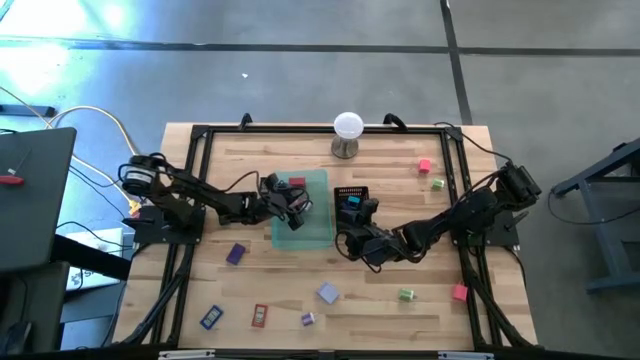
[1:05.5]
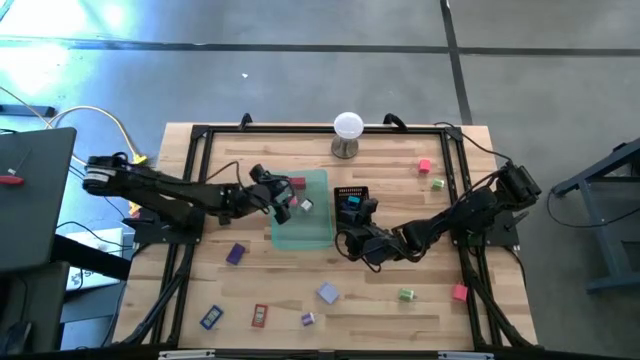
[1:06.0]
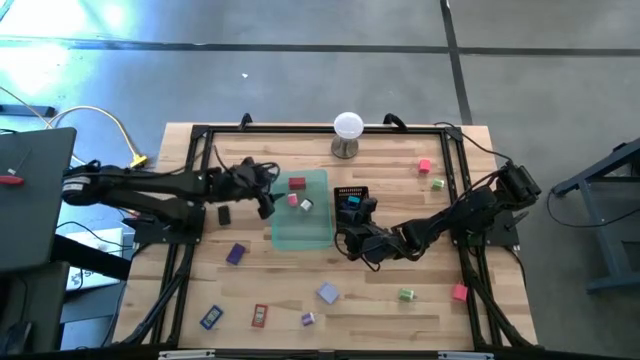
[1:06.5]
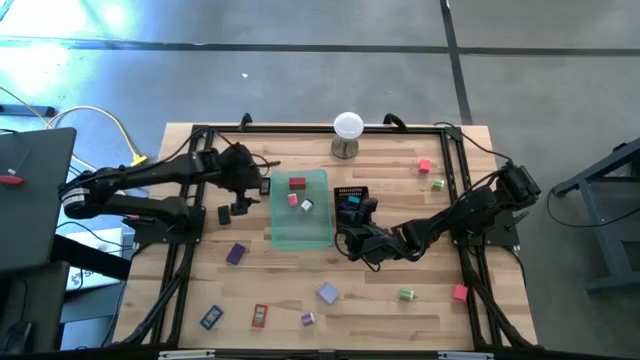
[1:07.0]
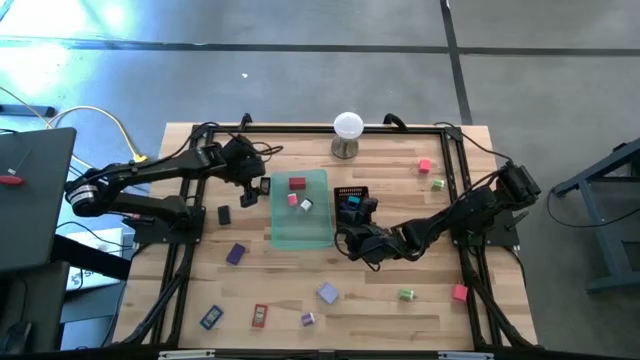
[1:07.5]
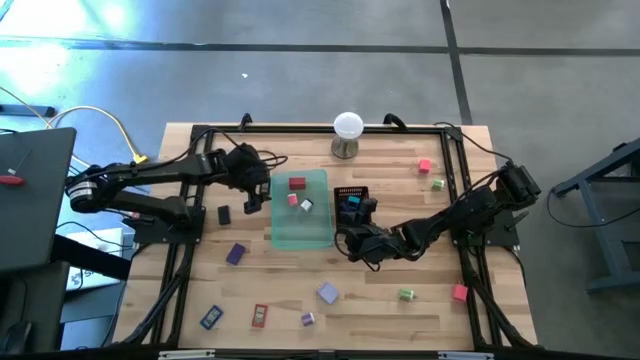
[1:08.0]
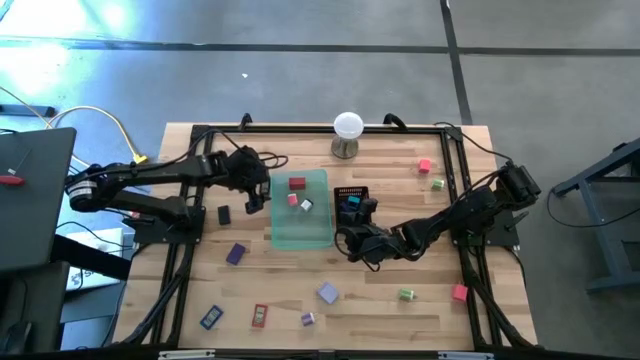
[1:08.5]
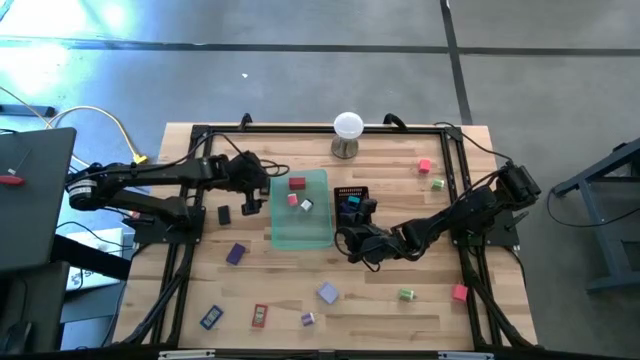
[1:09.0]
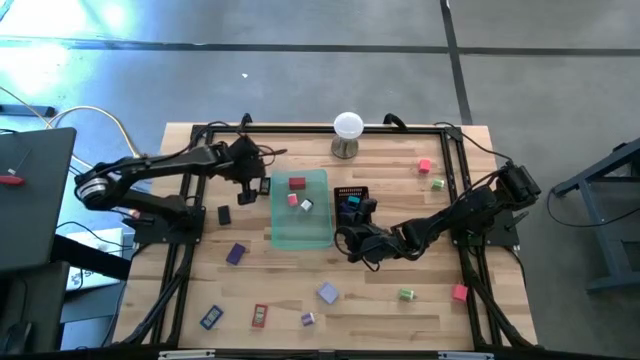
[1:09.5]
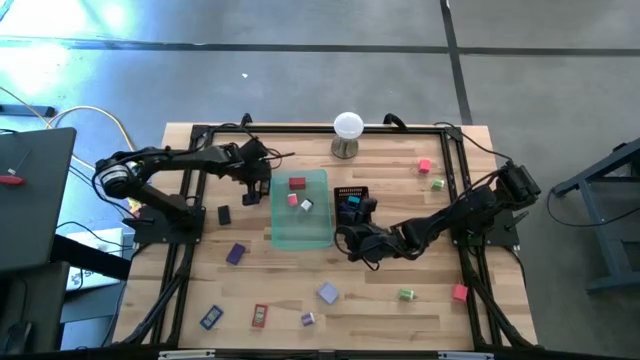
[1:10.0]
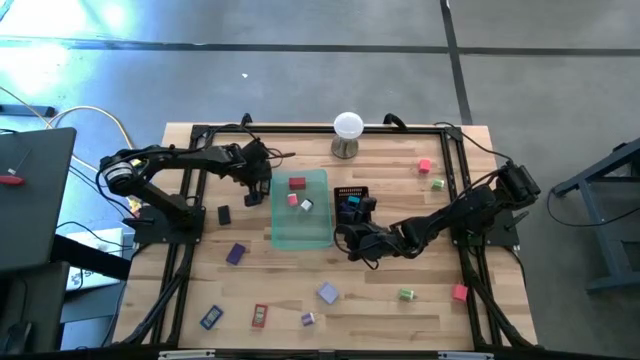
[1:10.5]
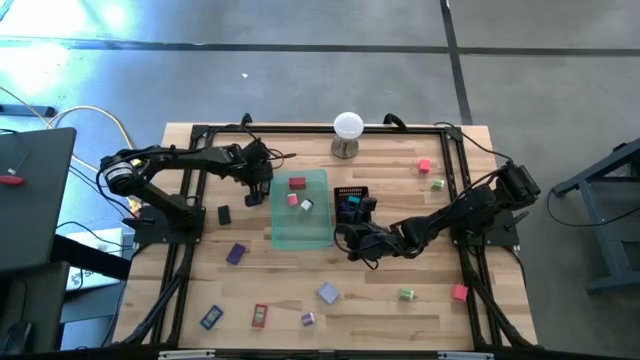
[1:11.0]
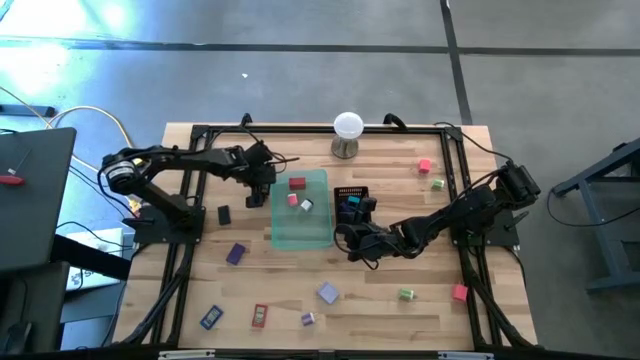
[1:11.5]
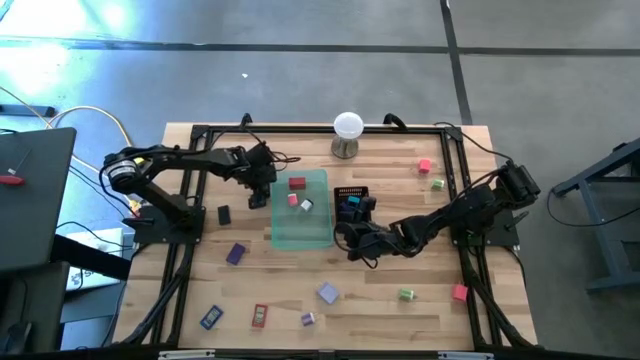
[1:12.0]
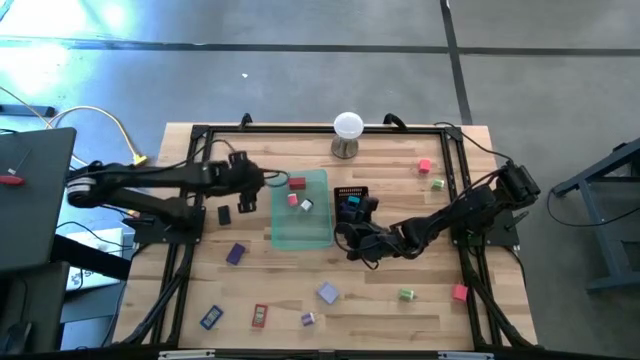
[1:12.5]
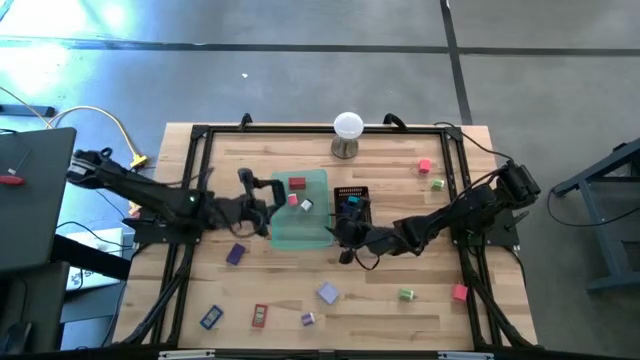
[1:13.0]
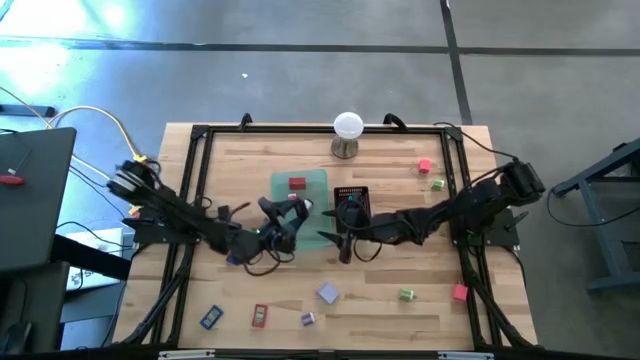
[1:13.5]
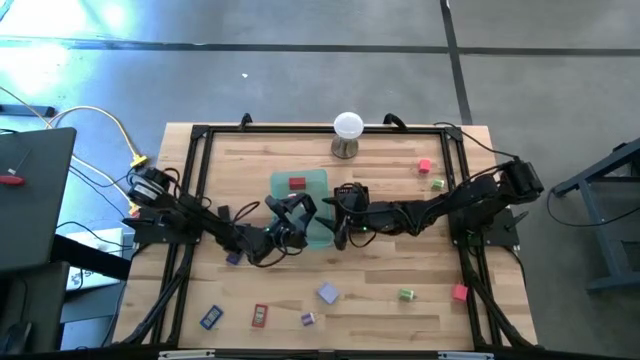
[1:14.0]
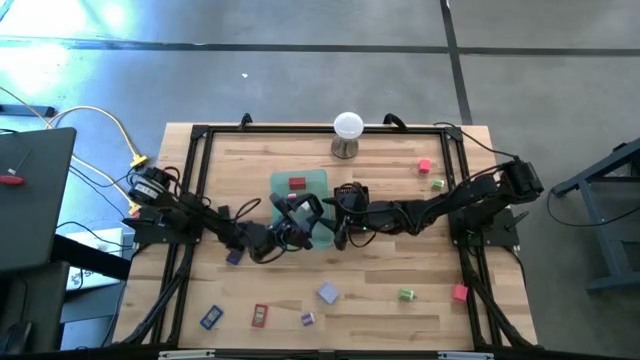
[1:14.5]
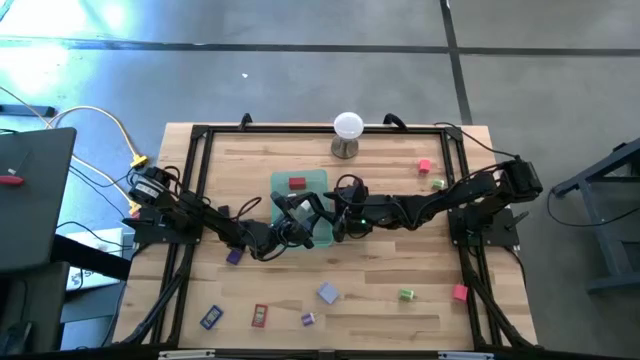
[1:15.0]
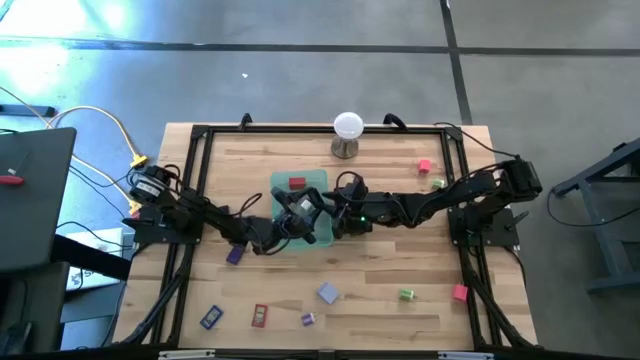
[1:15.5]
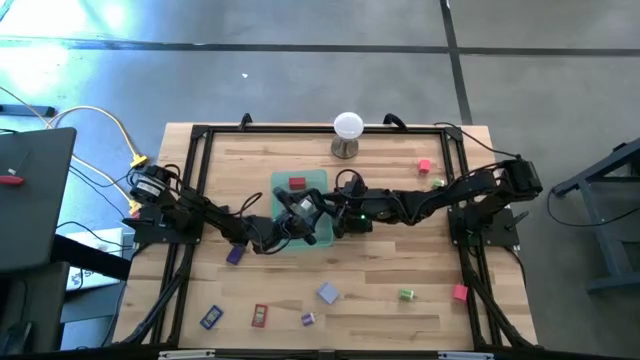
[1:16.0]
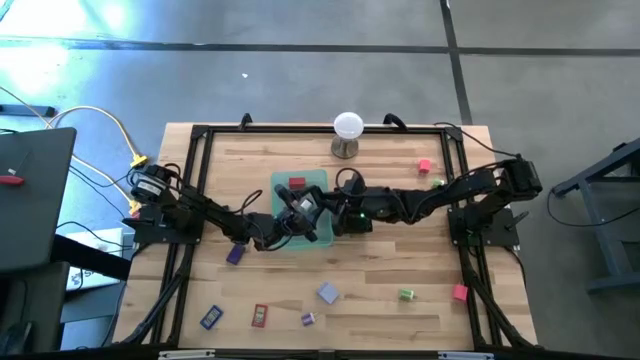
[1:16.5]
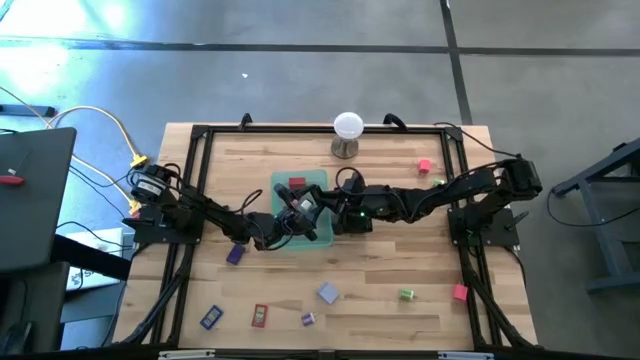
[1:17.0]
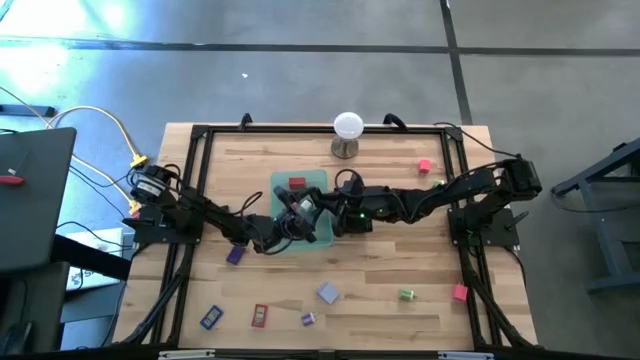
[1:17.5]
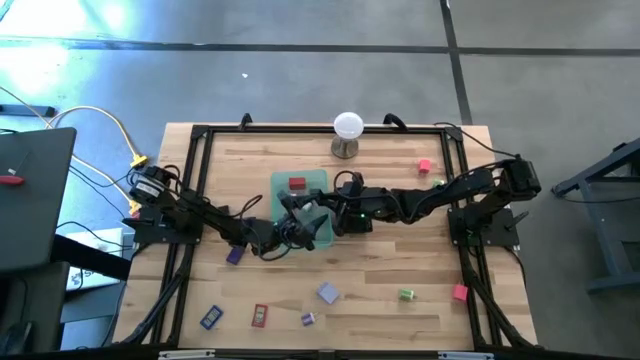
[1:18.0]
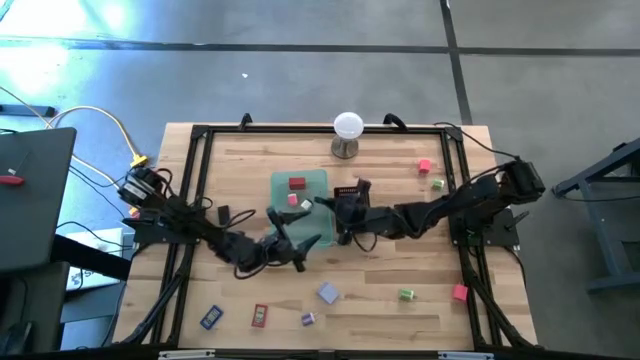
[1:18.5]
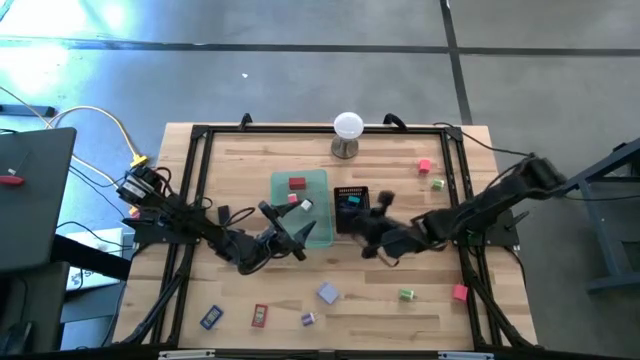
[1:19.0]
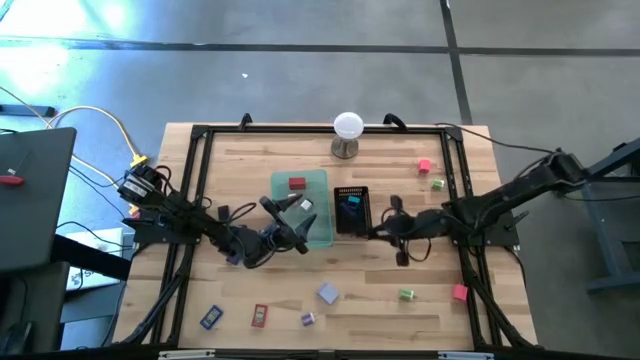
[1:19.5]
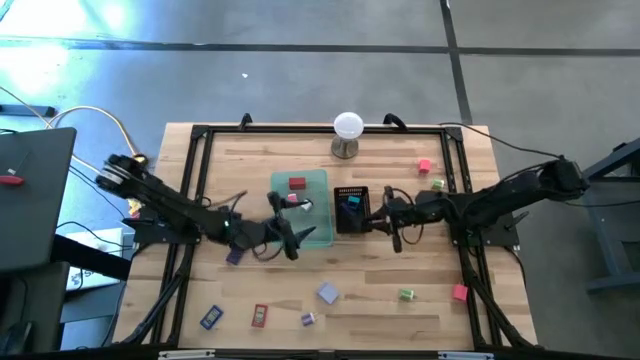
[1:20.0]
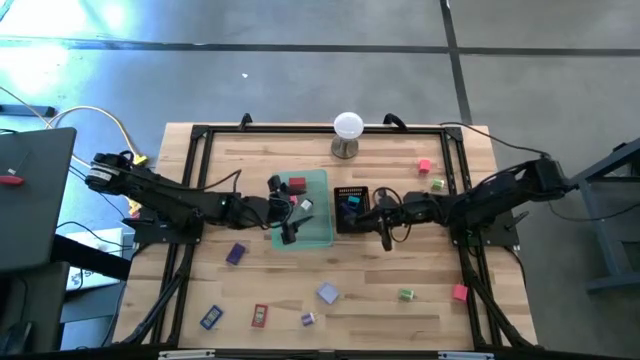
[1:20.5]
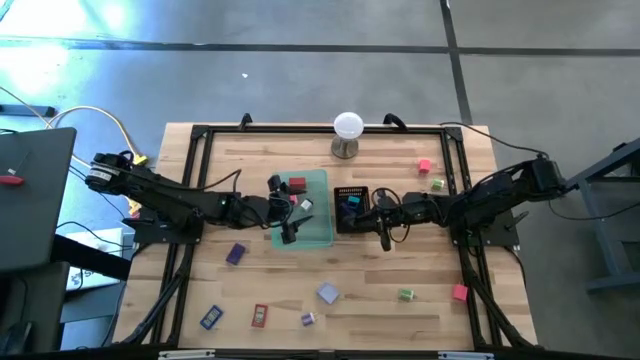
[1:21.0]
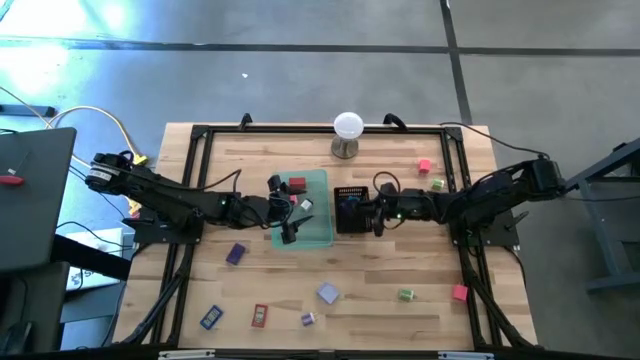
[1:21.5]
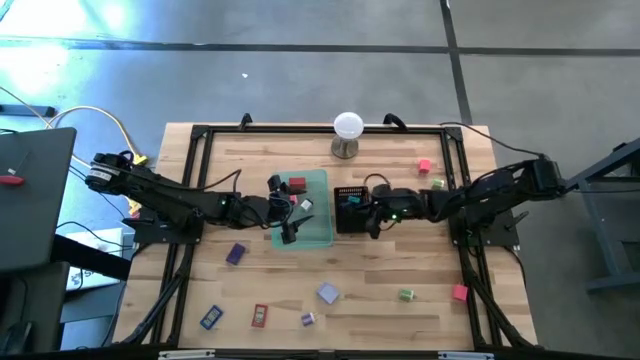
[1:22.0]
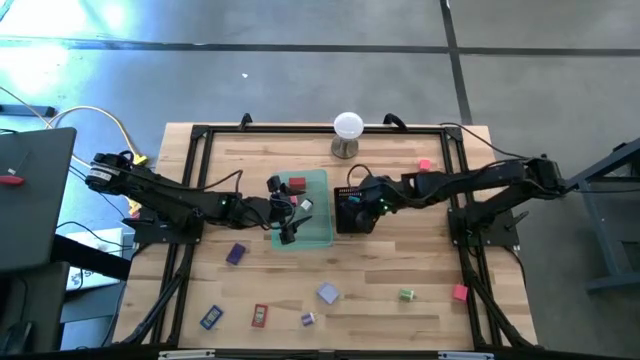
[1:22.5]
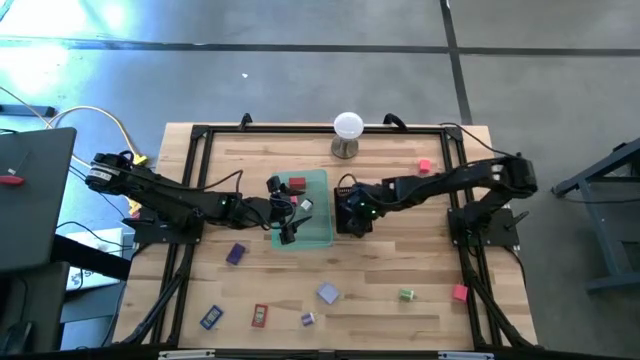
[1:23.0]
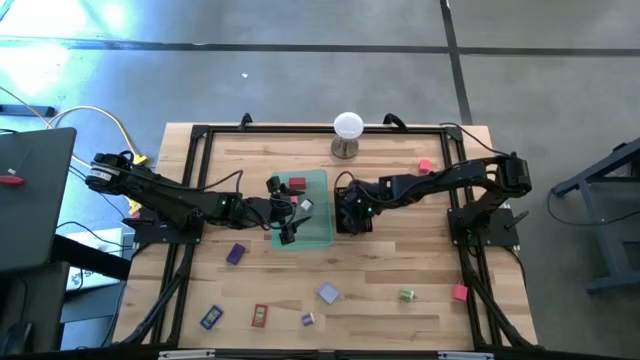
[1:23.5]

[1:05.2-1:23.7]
Task: Pick & Place Office items
Put the black digital clock into the black bin

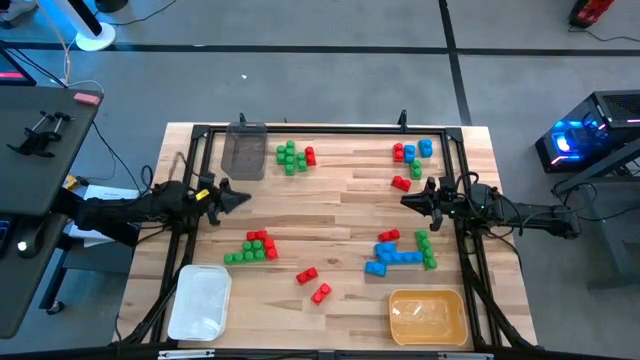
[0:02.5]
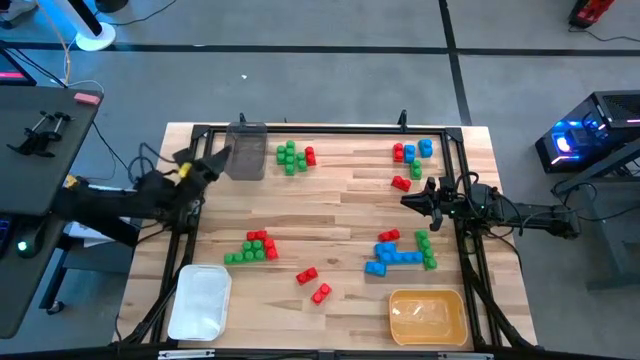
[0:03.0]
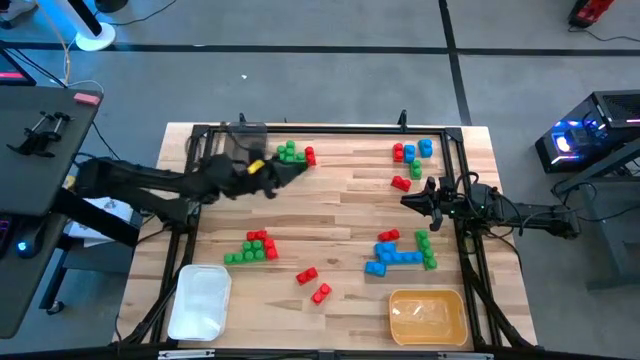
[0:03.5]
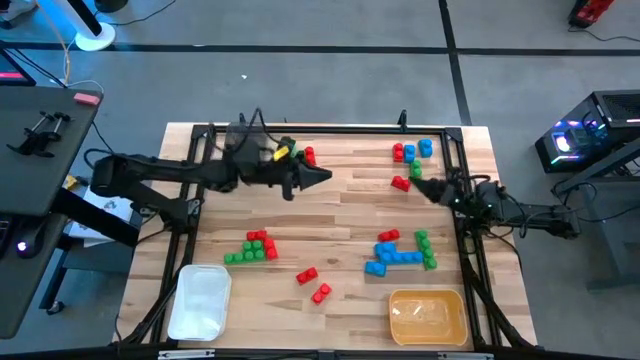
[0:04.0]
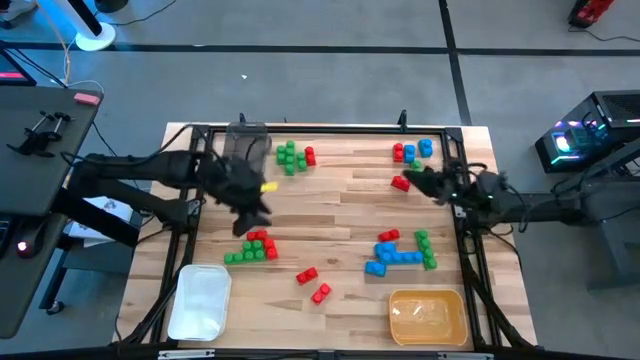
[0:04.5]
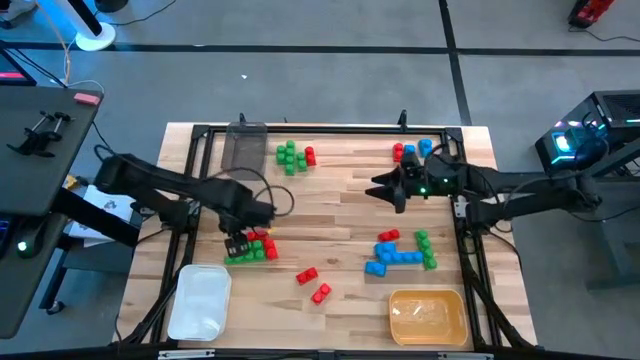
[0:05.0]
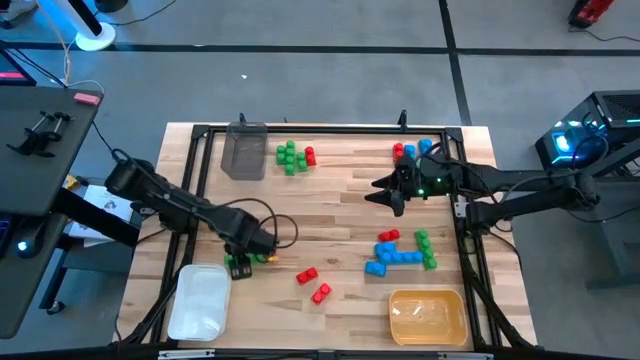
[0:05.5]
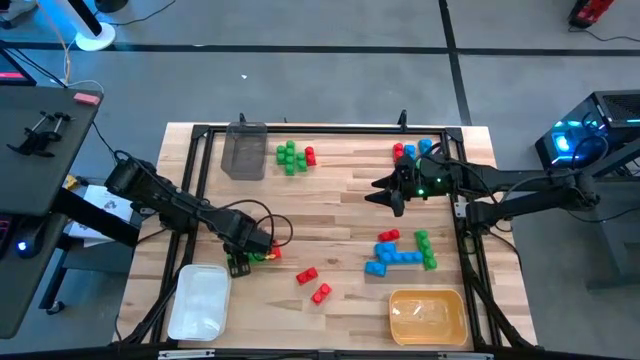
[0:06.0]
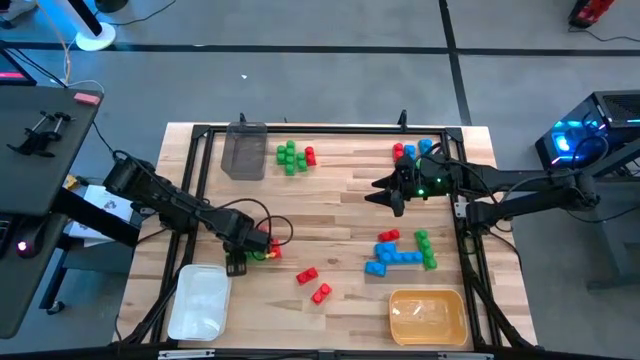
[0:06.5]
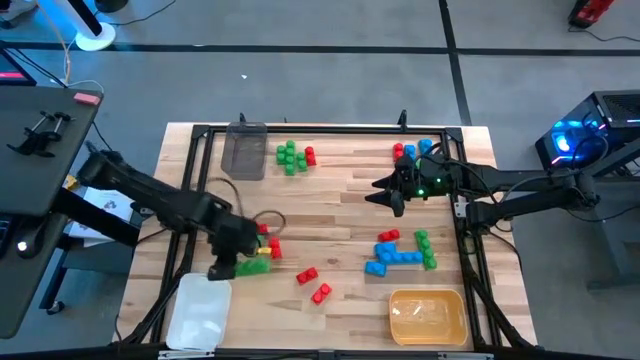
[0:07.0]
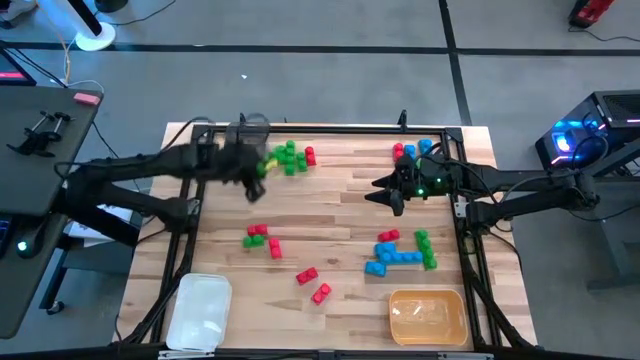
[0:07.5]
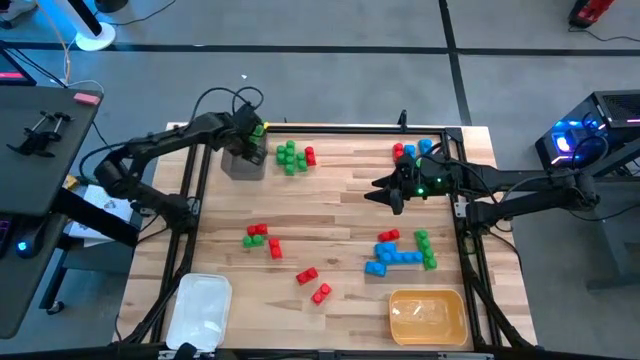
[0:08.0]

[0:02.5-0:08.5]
Task: Sort blocks
Put the green game piece into the black bin
